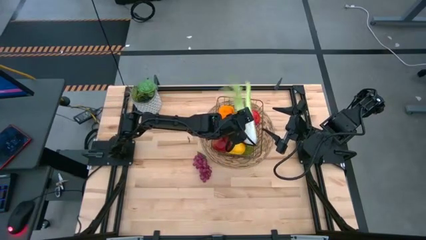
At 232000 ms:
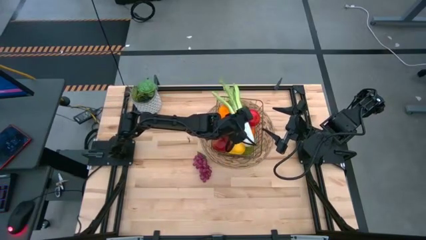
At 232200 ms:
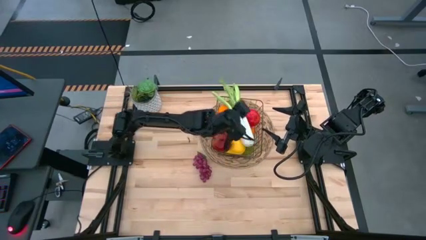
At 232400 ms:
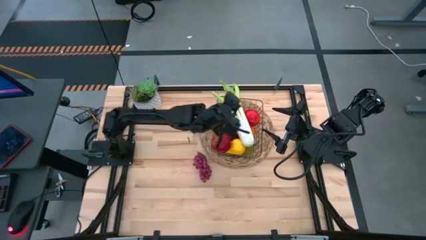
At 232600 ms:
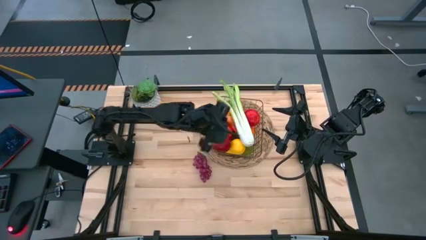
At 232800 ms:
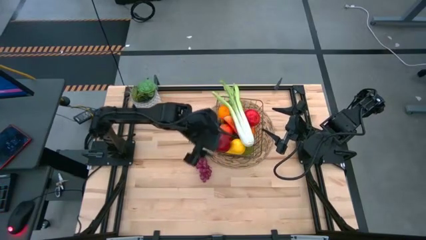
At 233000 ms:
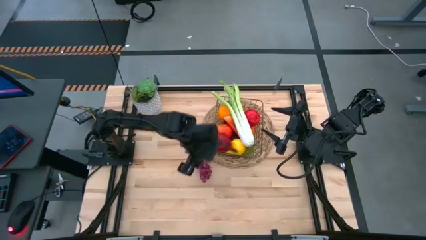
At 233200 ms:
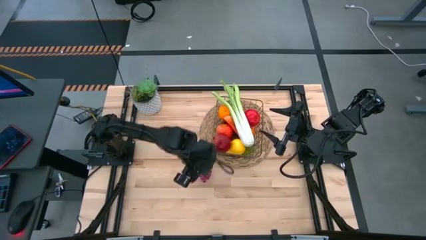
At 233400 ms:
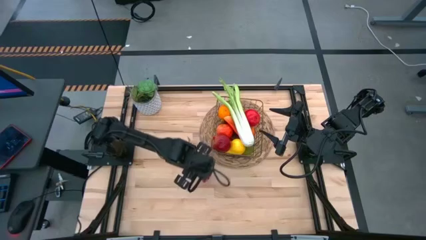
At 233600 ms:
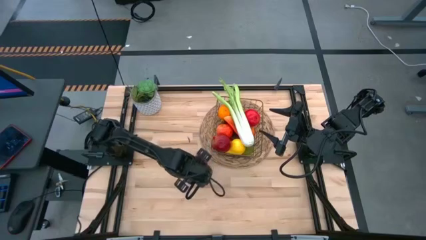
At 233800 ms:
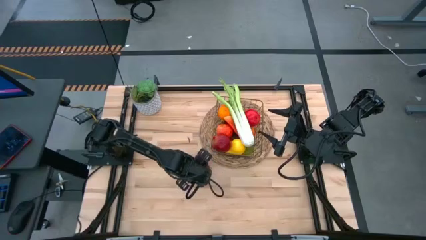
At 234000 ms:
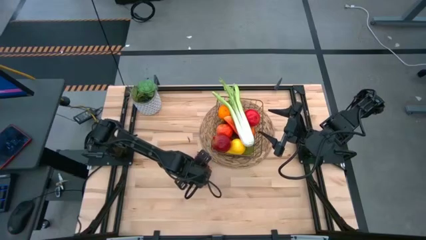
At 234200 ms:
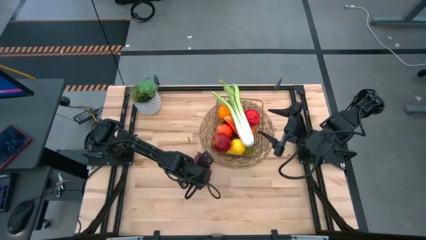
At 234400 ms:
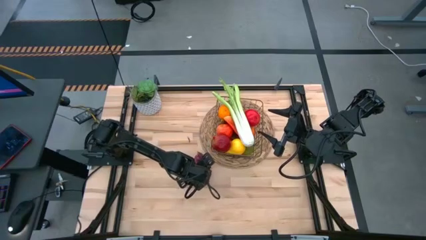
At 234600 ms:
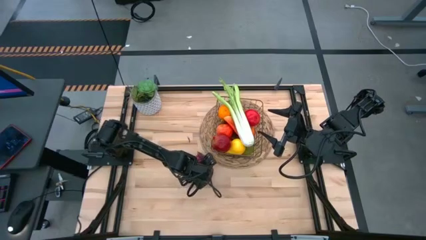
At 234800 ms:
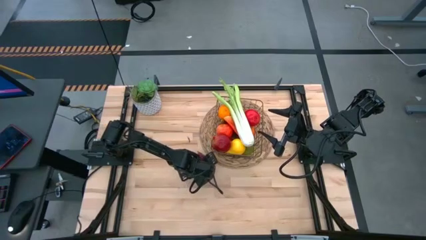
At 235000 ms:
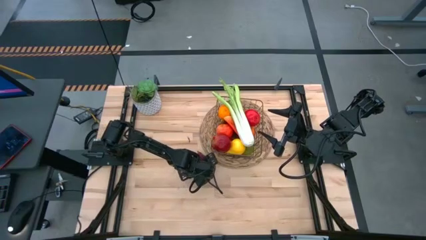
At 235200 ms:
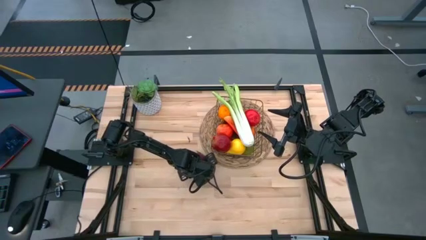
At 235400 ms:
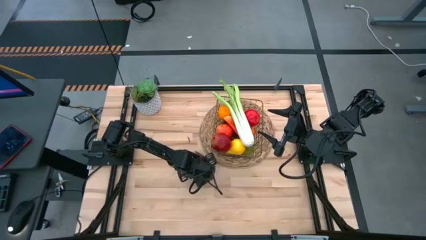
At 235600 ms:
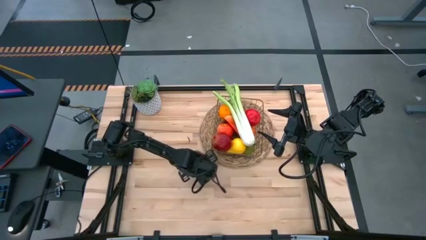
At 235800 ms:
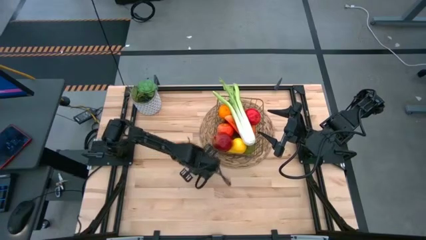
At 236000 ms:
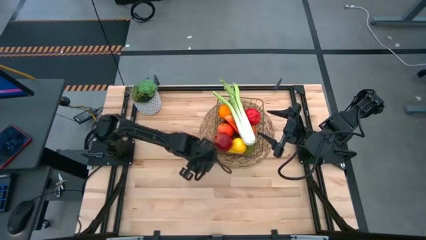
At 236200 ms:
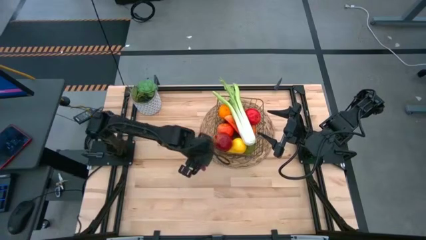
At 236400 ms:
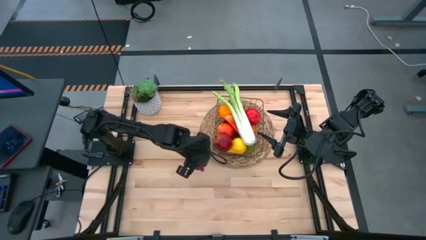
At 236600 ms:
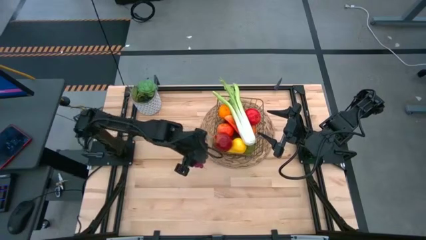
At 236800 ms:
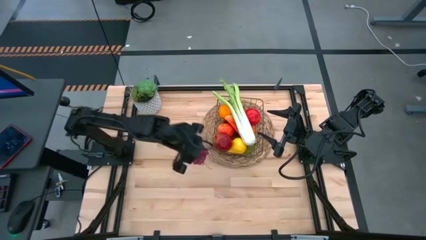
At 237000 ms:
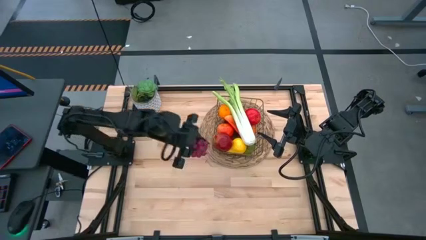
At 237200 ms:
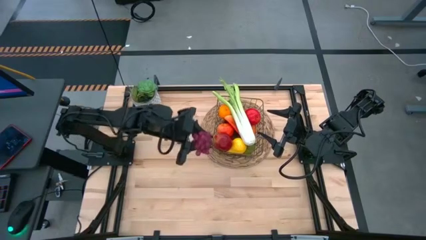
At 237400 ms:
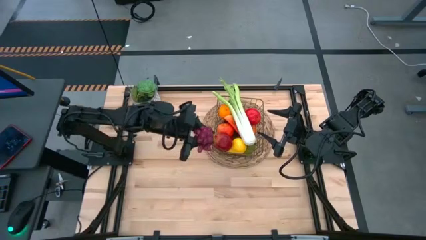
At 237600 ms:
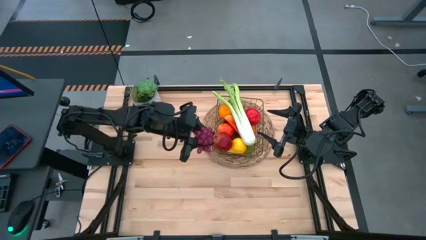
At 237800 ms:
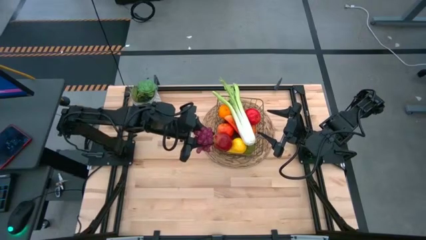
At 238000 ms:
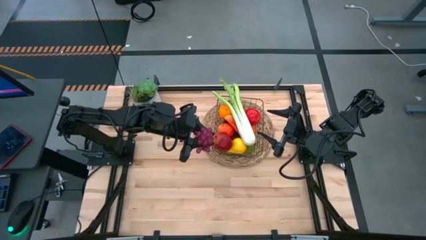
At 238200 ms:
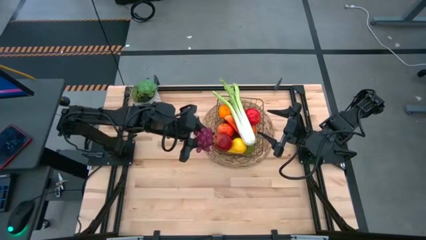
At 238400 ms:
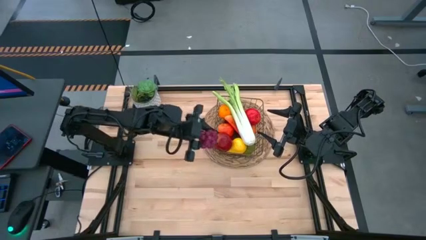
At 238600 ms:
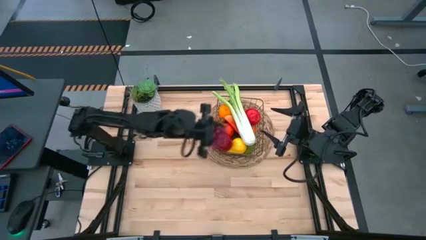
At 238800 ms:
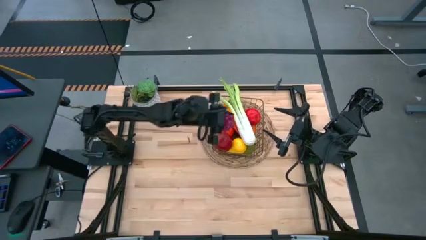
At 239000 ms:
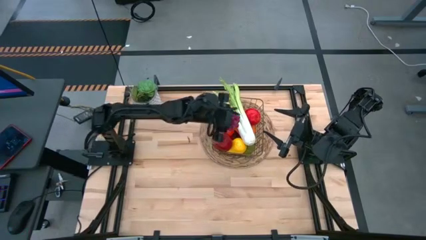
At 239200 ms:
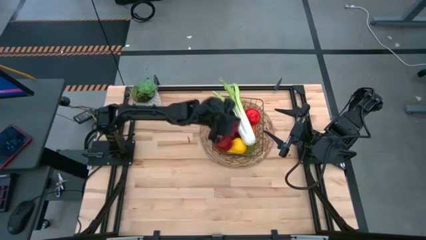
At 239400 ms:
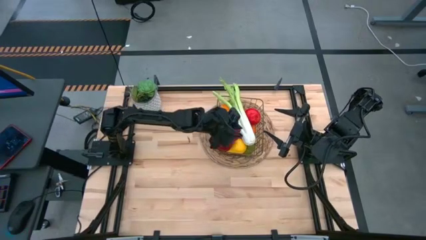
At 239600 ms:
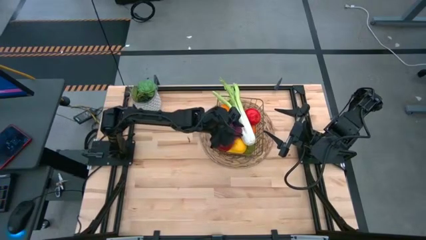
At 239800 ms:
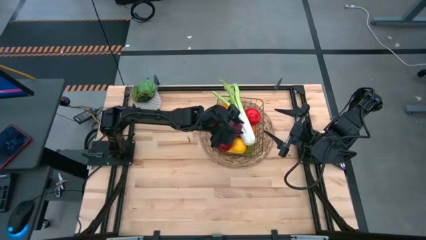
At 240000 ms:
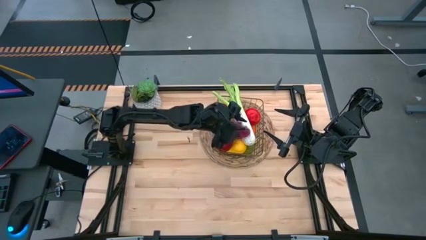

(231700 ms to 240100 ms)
Task: Build produce basket
Put the purple grapes into the gold wire basket

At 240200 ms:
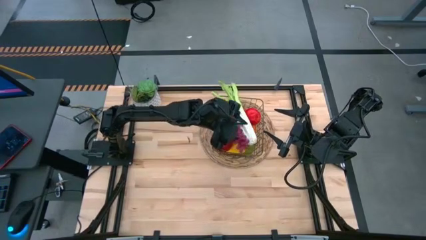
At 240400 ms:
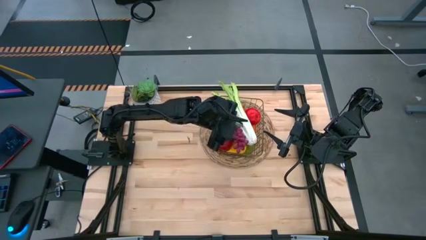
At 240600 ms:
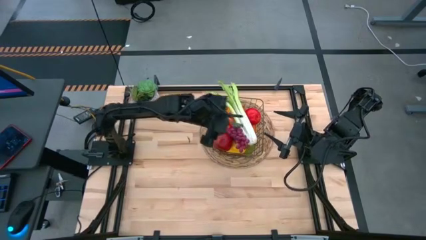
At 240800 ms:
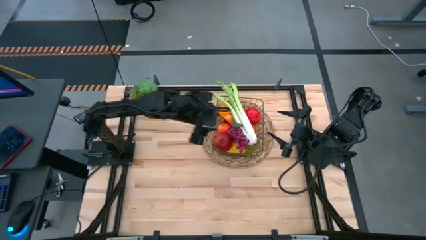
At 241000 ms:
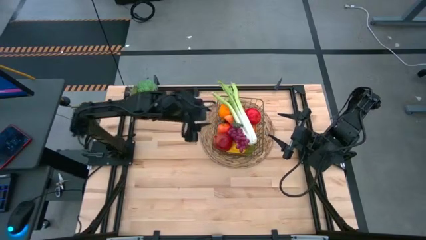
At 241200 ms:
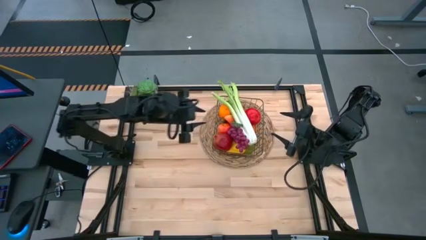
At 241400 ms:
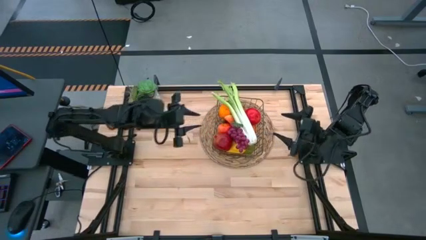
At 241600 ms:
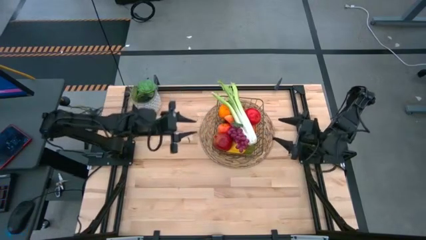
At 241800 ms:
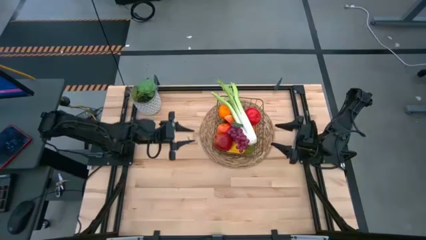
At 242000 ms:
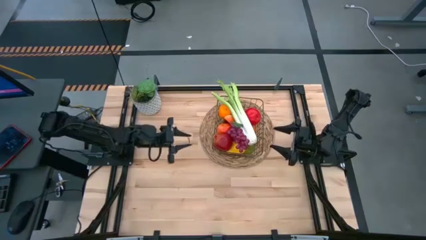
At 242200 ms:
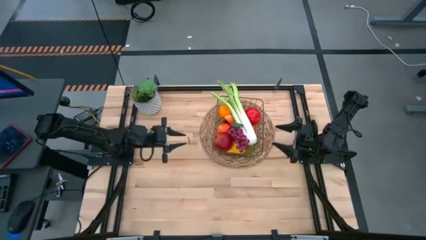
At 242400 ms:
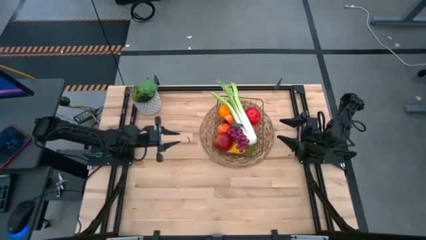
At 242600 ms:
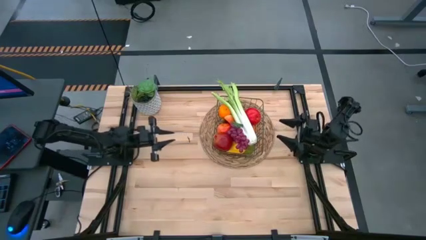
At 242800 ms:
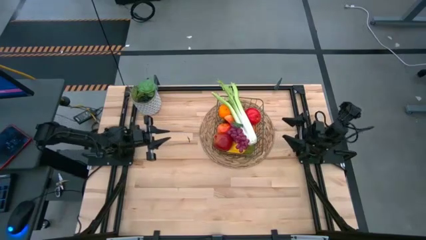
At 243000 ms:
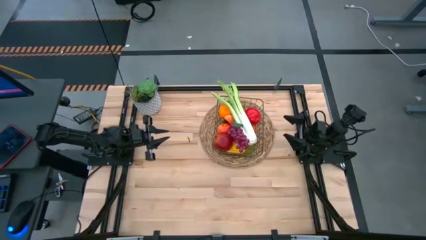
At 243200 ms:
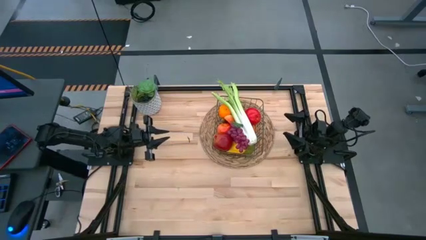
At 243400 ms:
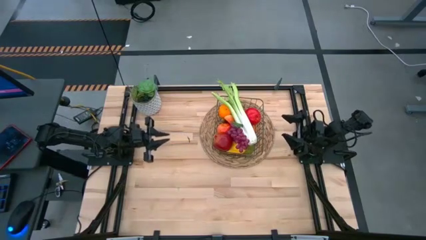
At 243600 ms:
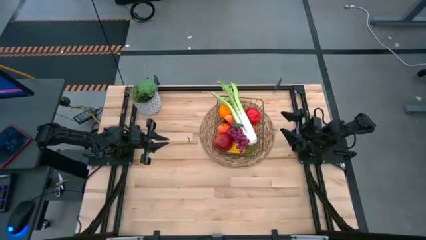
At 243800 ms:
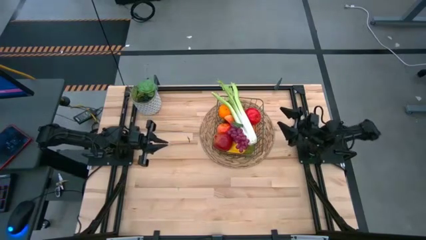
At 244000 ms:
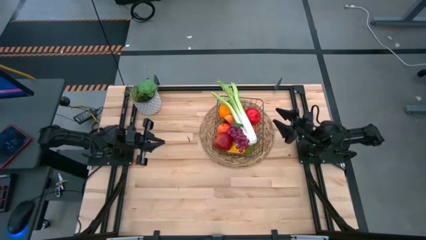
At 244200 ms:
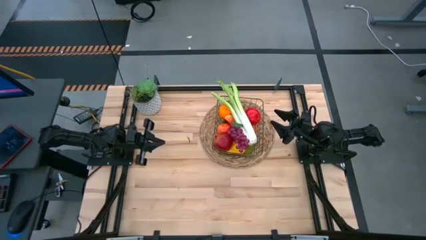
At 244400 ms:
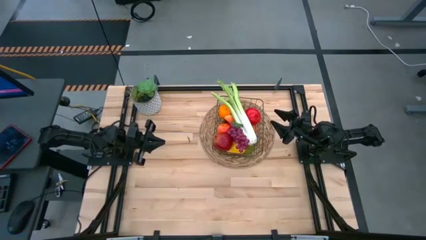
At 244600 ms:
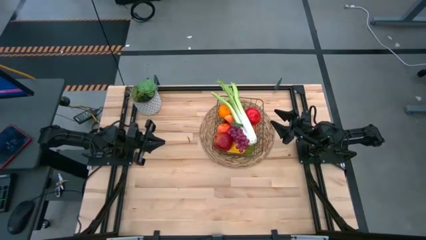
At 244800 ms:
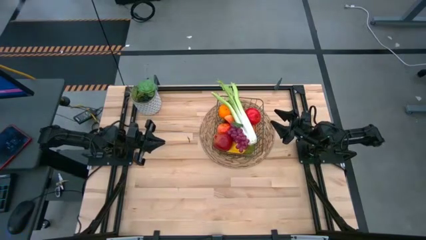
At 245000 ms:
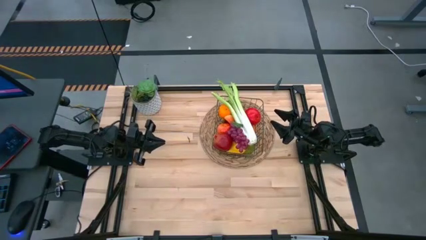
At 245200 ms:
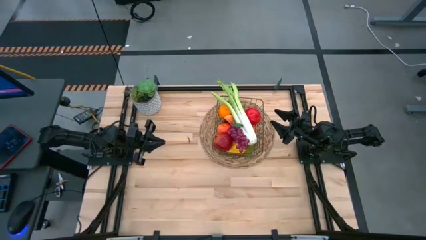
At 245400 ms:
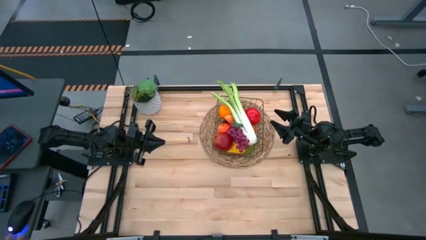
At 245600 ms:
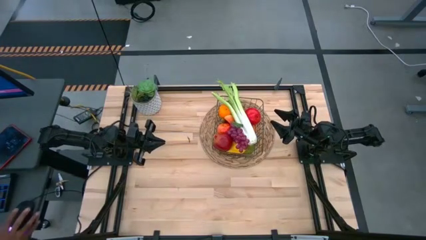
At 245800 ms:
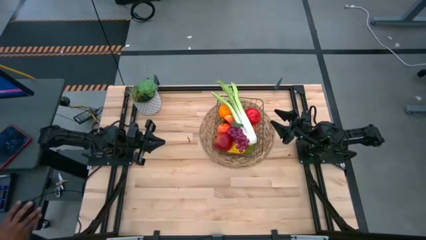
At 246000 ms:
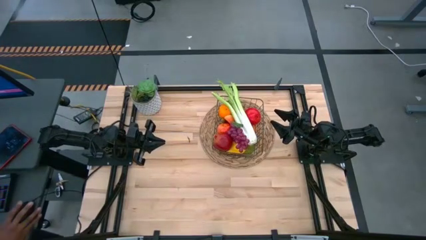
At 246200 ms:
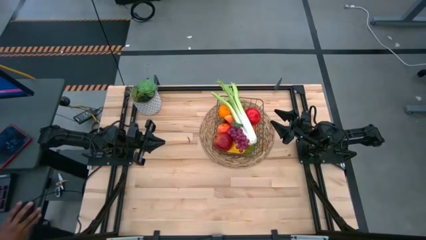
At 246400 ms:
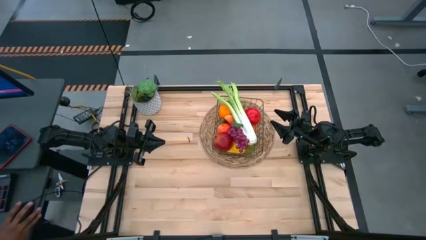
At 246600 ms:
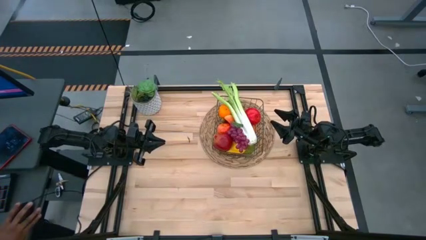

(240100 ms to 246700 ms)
Return to Home Position

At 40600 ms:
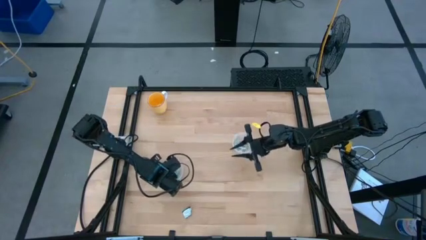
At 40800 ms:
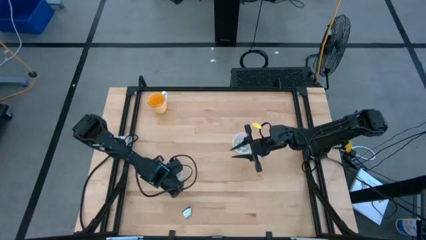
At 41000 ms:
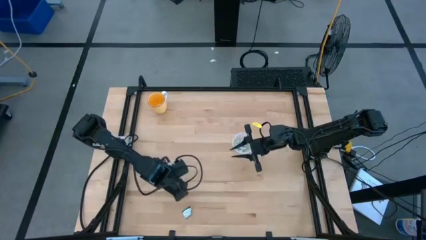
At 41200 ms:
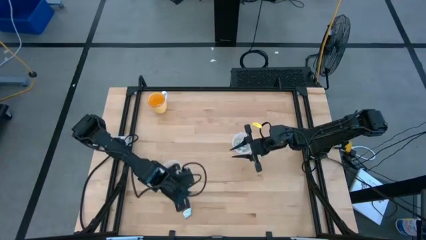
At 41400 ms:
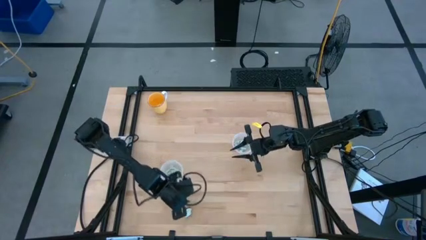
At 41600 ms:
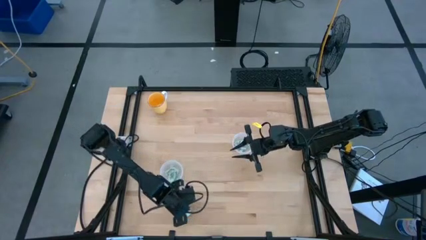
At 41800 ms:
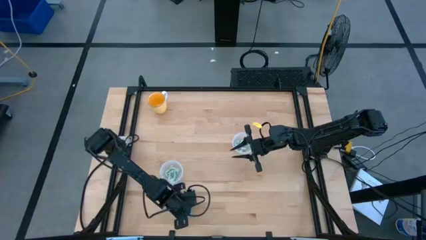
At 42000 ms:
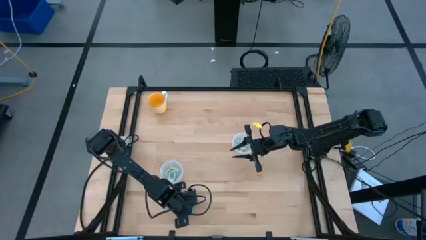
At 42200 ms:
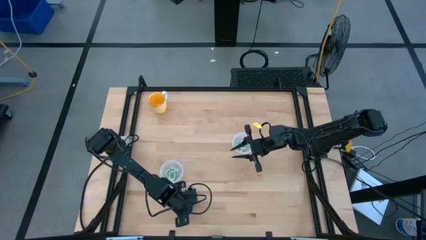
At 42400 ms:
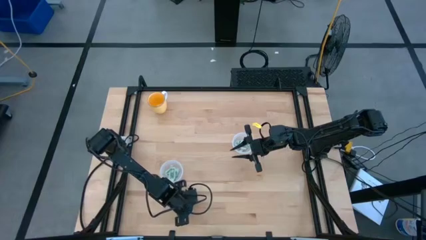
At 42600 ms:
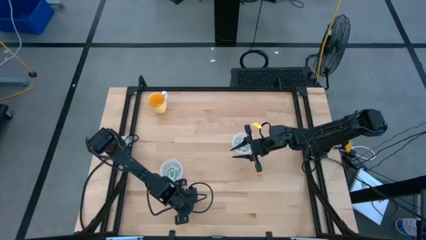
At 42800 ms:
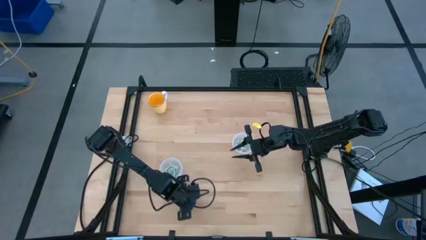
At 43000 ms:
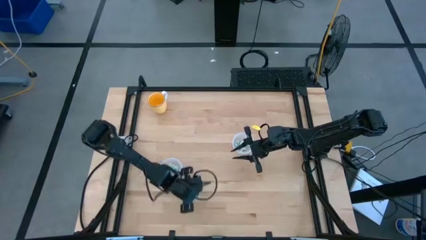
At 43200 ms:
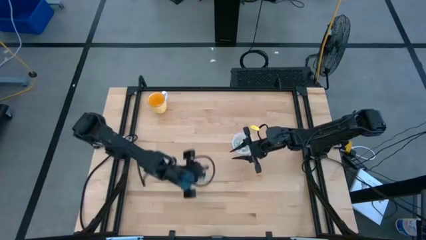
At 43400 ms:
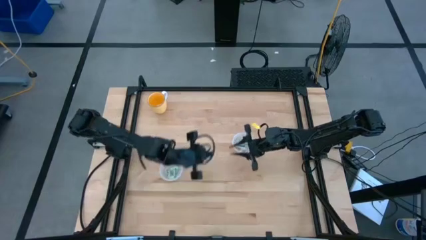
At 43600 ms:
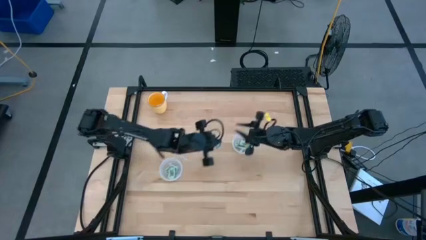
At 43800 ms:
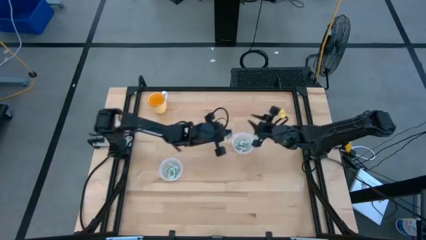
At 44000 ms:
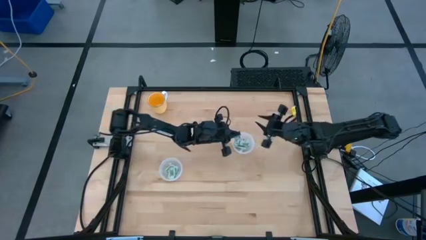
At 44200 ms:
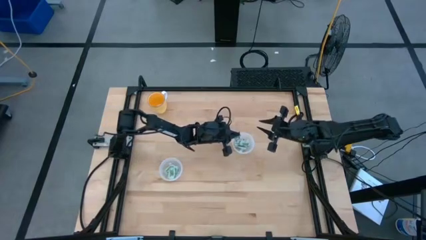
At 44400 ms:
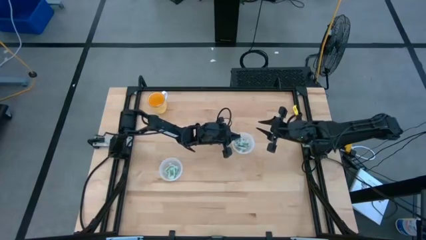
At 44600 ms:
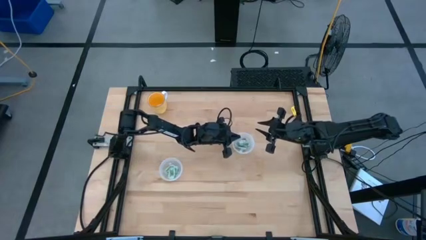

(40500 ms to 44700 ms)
Task: Pick and place Stevia / Truvia into bins
Put the white and green truvia packet into the top transparent container
